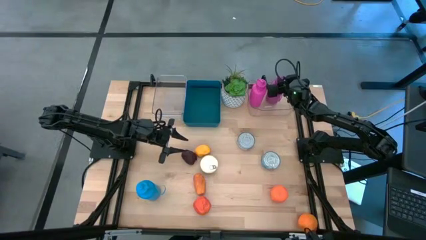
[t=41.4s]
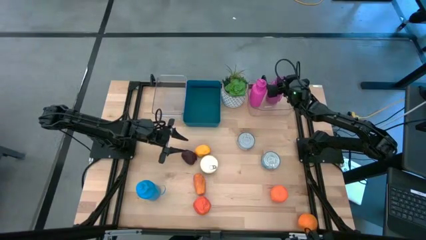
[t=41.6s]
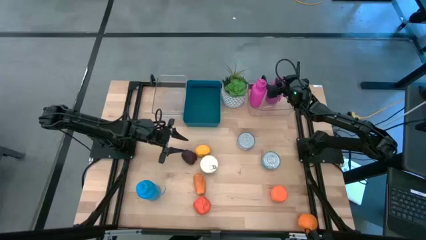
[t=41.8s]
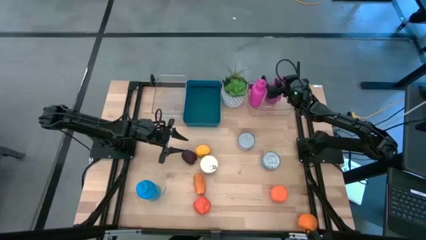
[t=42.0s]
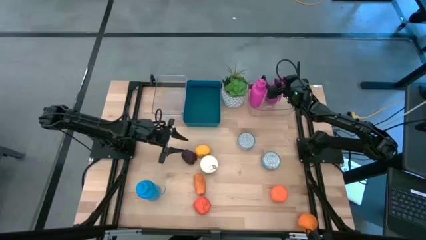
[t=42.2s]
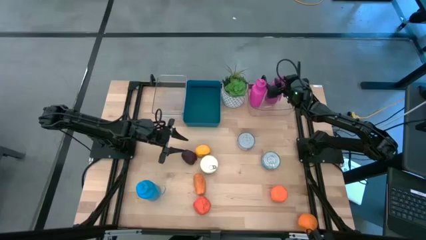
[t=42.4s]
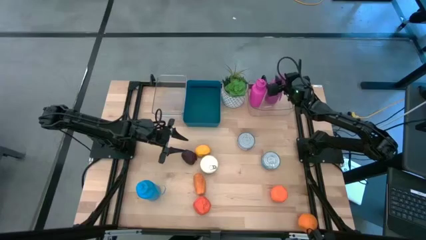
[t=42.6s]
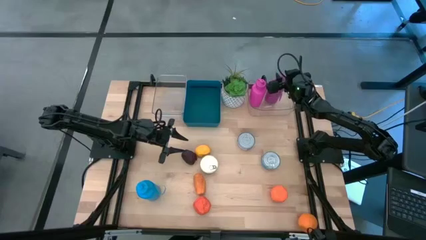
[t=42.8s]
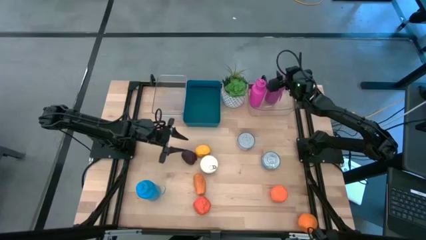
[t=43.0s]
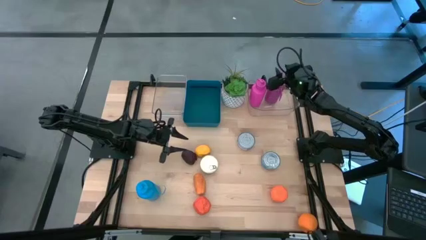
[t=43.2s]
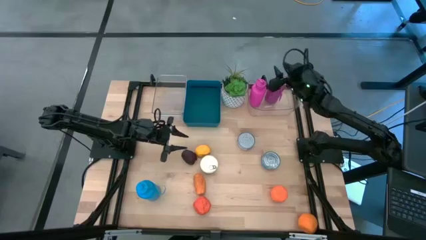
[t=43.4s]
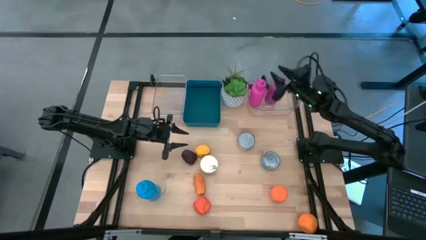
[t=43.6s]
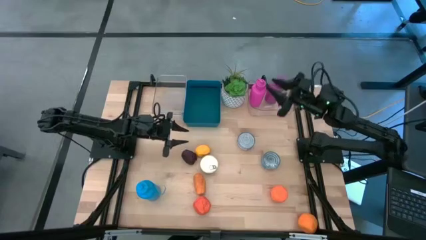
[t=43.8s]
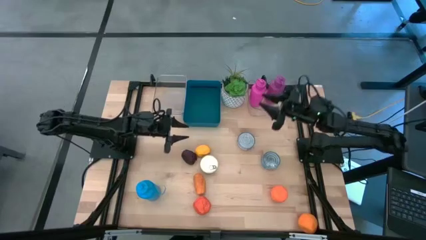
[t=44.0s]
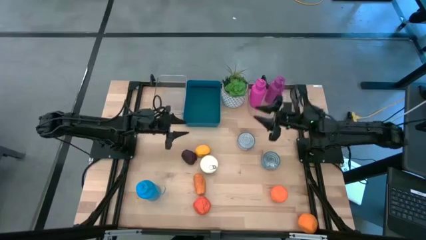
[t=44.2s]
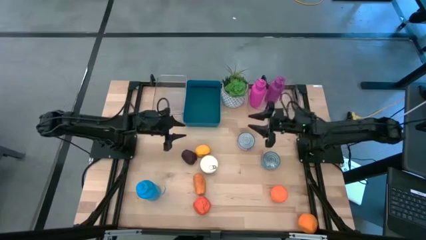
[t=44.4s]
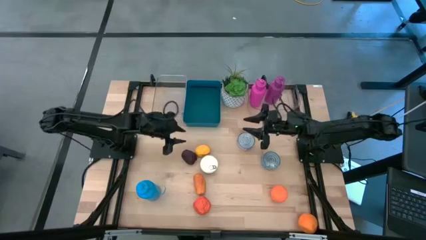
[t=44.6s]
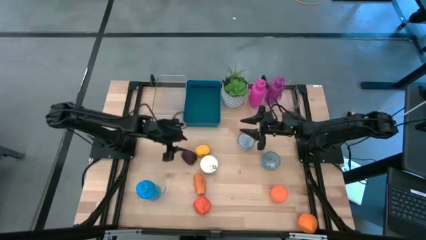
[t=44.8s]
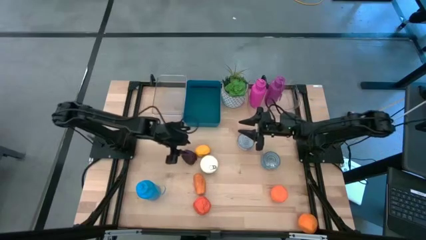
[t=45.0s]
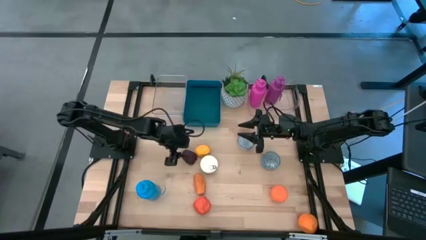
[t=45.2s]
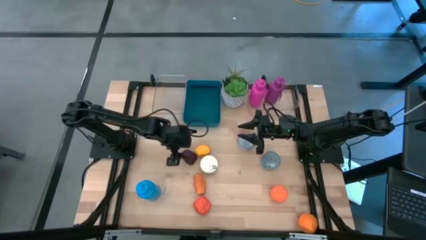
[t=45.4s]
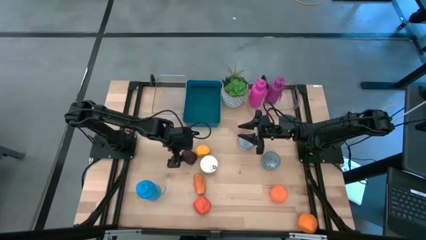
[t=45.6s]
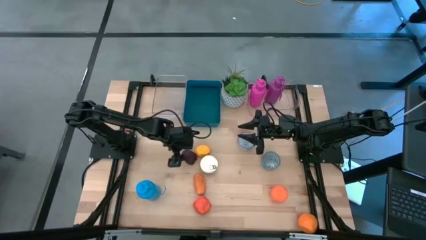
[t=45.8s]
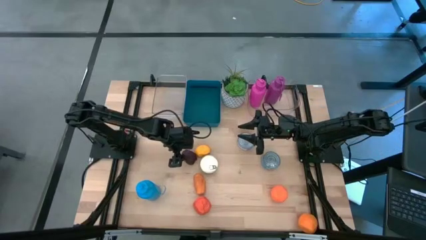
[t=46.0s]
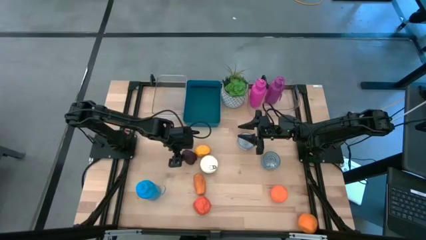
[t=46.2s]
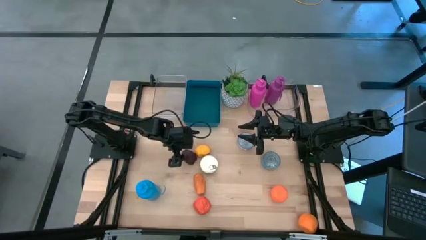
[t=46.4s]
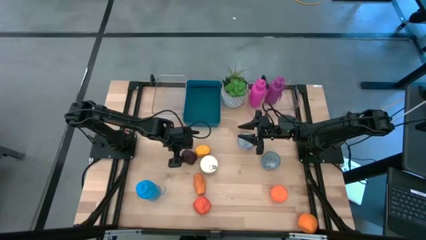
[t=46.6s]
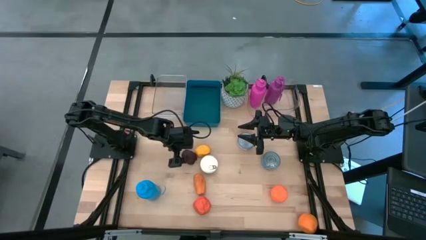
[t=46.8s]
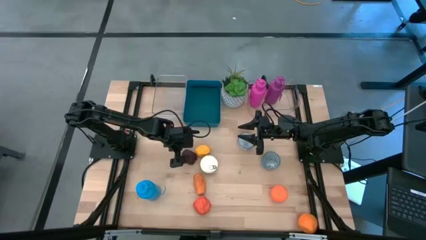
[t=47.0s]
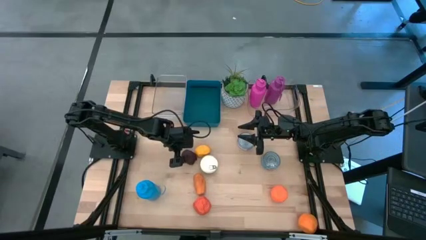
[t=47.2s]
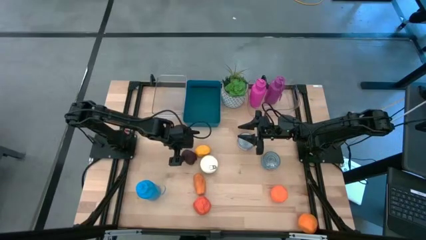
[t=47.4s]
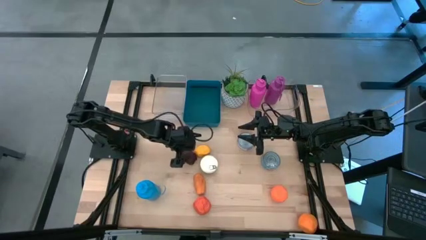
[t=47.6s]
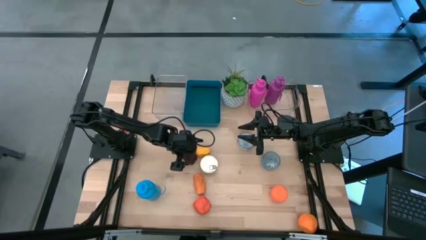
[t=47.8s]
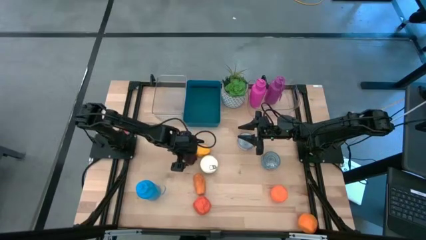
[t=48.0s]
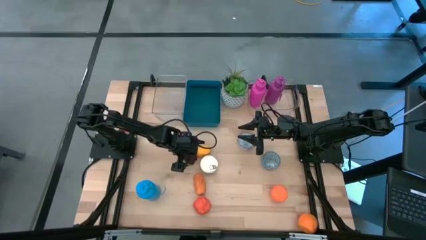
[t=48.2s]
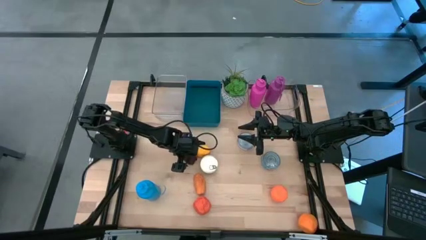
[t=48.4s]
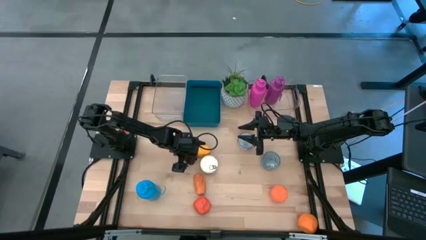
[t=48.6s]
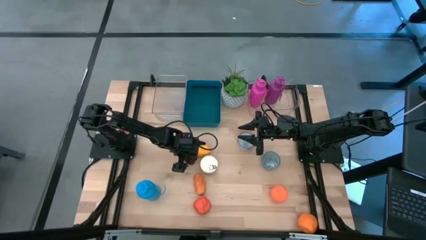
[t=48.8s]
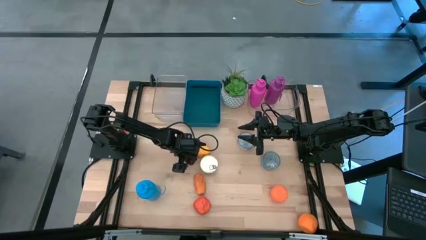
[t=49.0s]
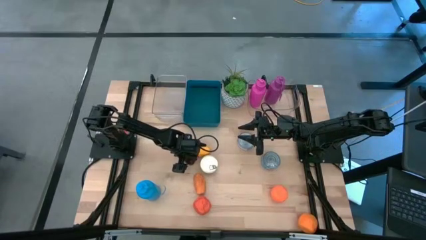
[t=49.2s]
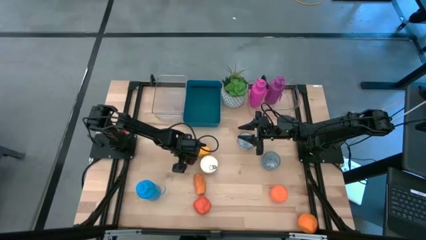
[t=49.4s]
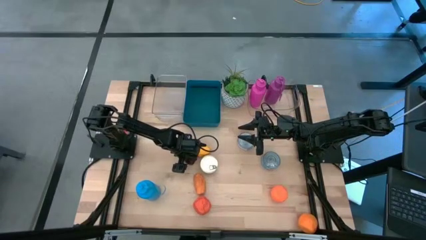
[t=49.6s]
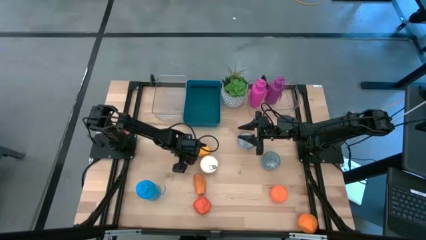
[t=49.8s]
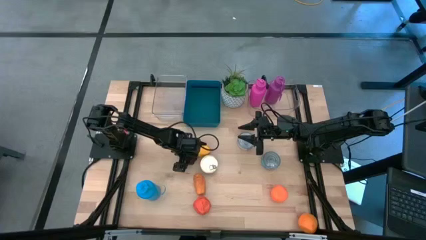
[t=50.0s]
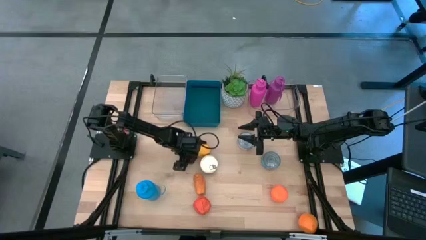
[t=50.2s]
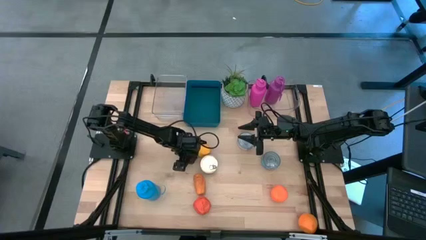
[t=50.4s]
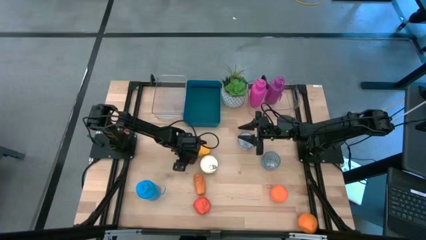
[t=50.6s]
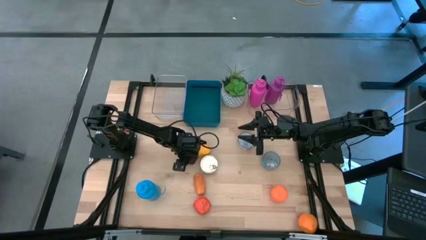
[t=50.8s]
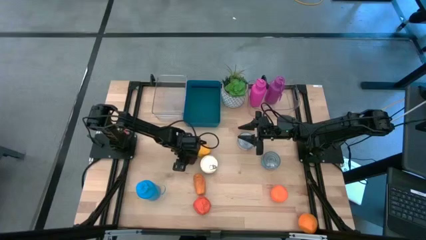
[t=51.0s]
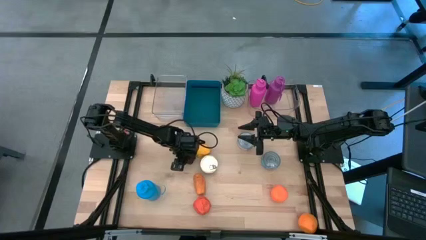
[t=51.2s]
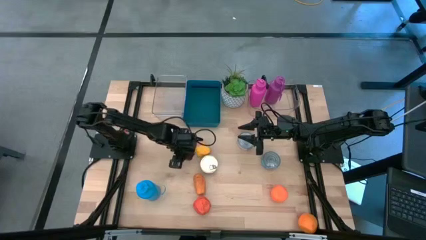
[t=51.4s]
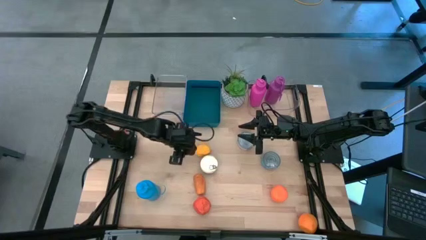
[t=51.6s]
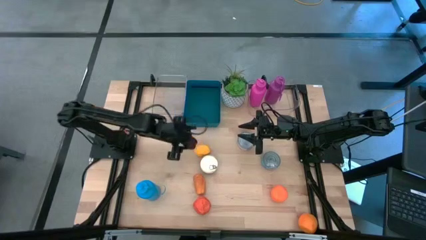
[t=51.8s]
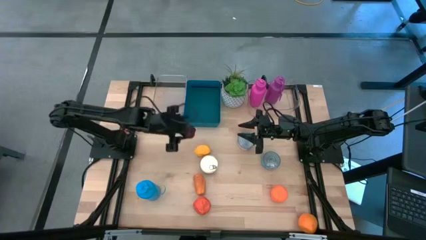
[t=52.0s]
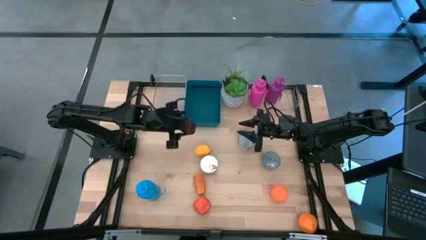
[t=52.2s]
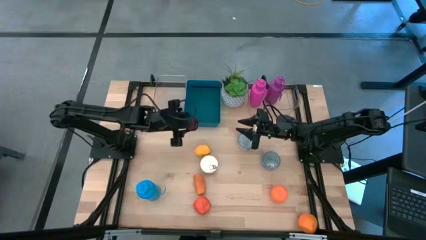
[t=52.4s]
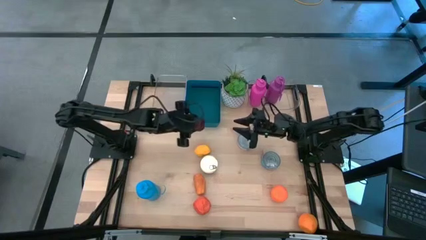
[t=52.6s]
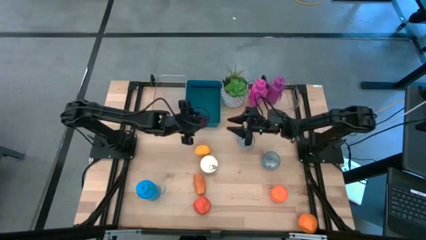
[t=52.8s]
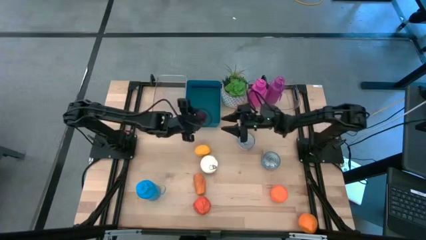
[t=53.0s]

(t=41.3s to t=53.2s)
Task: Pick & Place Food Item
Put the apple into the blue bin

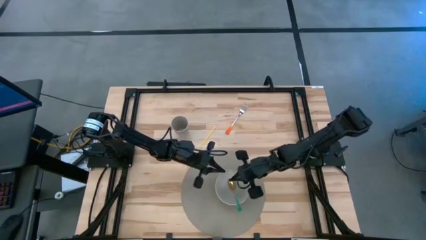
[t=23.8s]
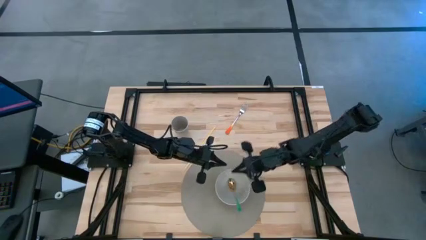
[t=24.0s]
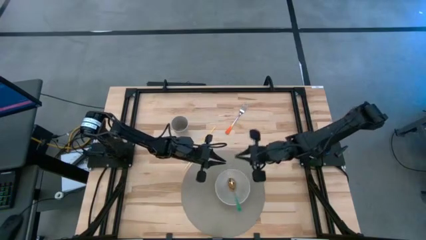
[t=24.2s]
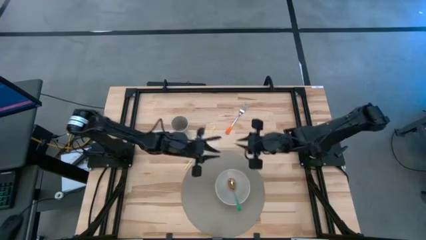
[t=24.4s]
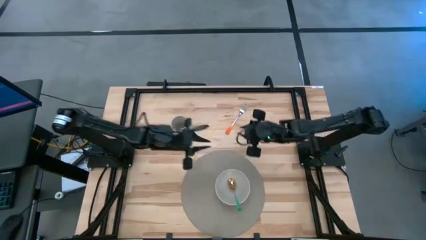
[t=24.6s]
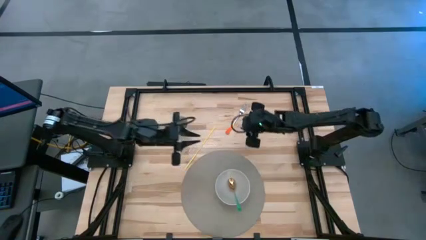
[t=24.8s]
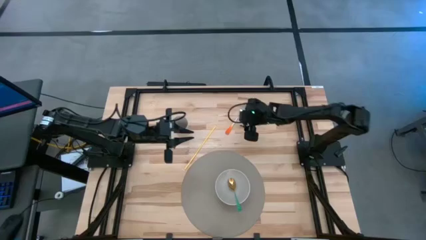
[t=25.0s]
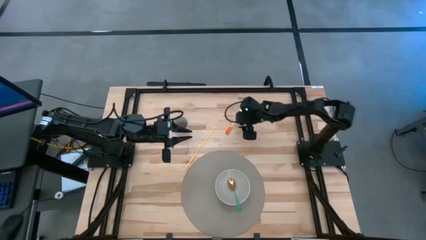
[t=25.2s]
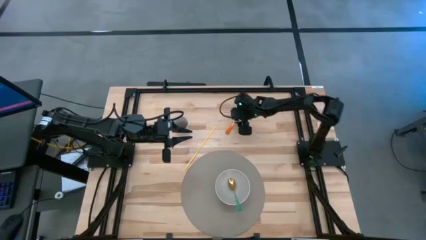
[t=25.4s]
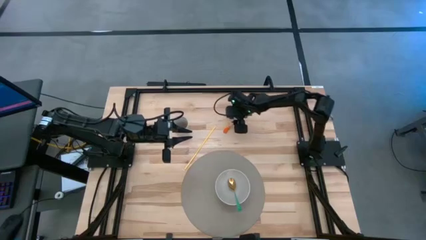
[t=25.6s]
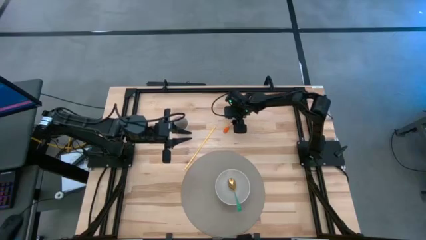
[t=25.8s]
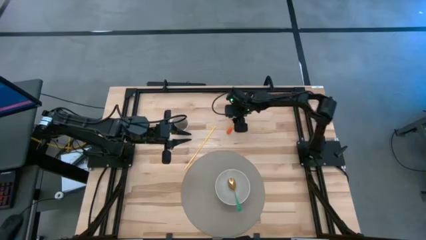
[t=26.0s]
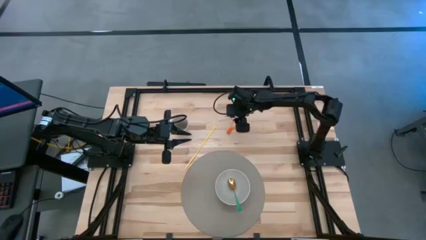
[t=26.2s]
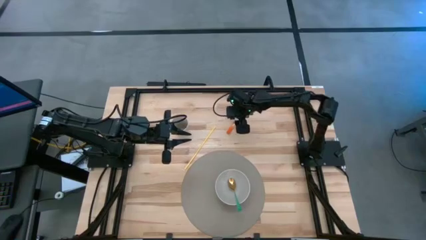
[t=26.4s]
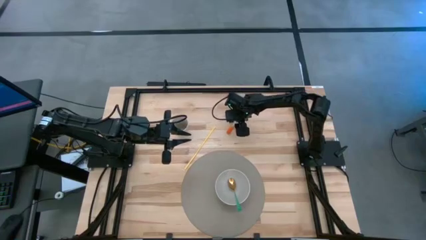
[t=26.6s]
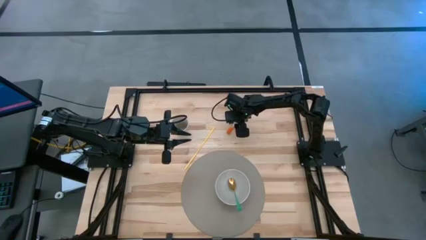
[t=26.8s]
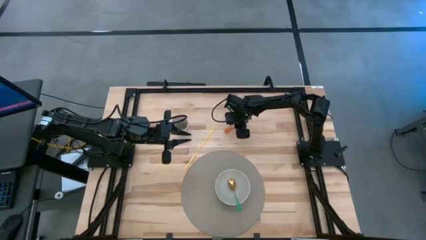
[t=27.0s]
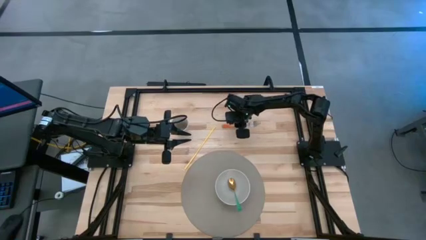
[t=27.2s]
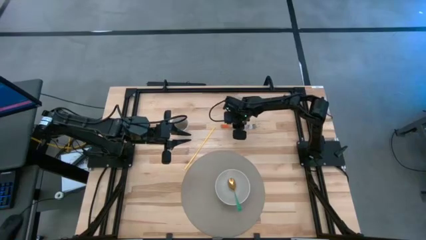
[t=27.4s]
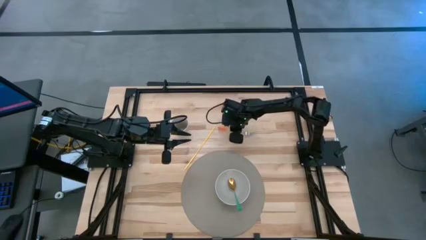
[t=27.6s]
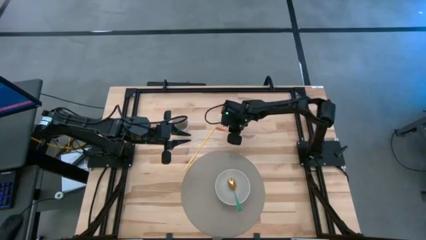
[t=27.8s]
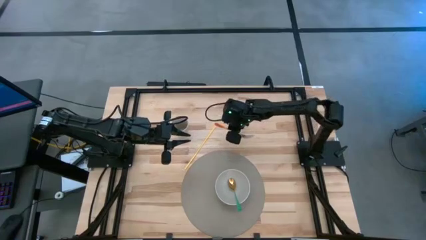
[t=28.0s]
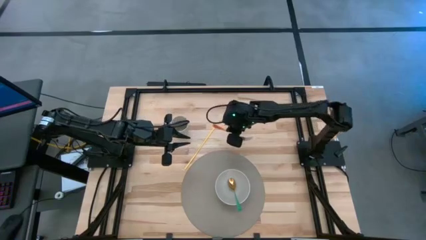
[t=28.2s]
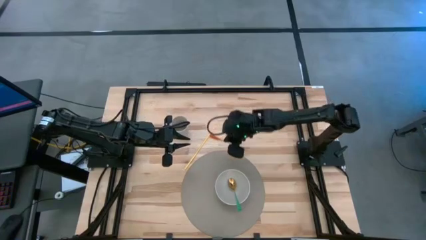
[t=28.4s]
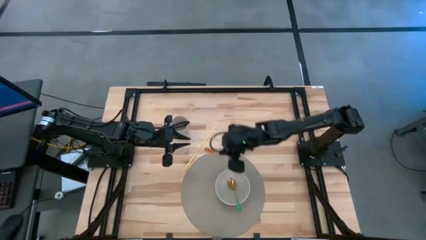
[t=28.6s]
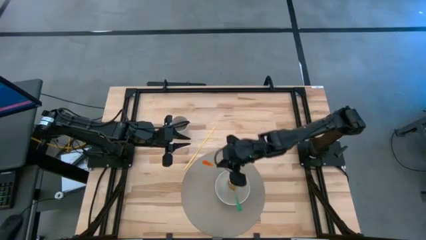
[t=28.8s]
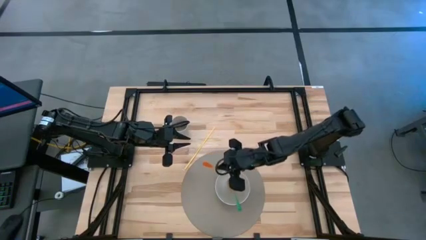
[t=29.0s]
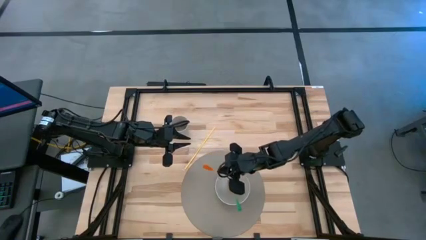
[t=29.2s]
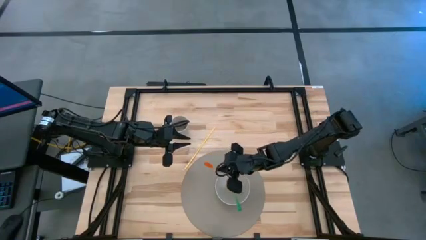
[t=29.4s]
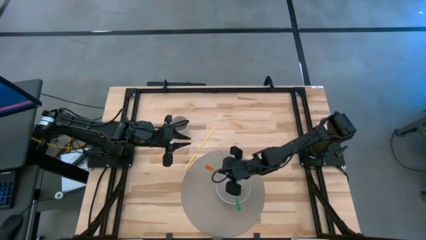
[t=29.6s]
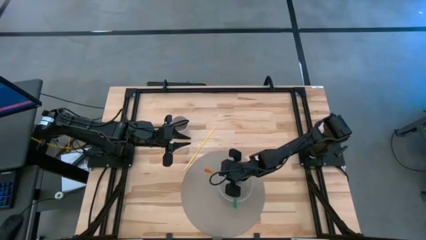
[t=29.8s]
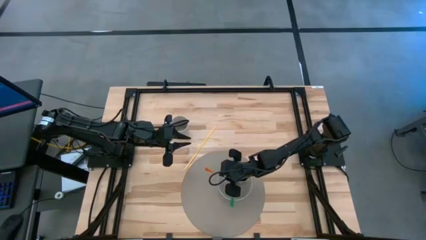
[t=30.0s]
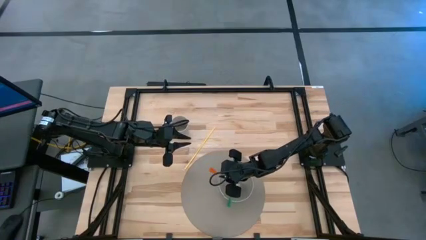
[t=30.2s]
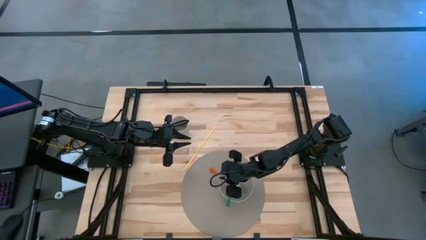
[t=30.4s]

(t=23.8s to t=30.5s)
Task: Pick & Place Utensil
Put the orange fork into the white bowl on the placemat
